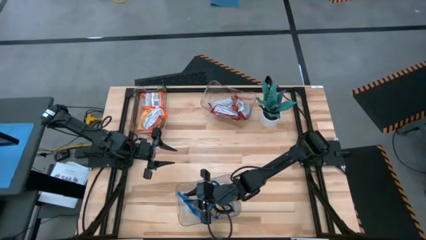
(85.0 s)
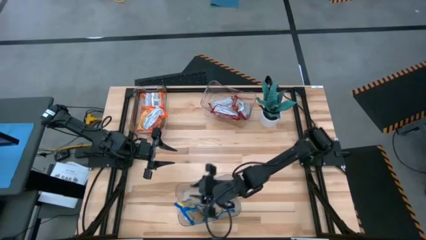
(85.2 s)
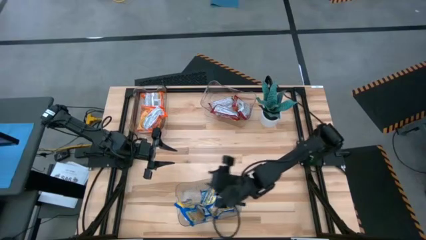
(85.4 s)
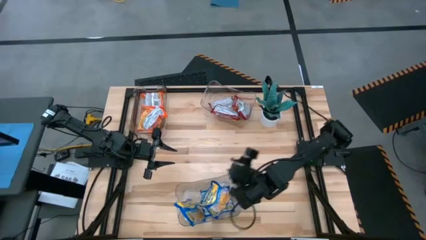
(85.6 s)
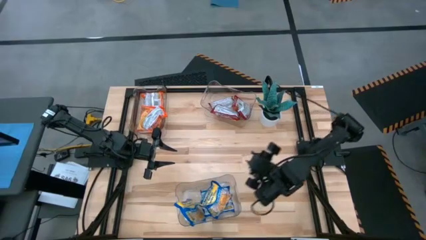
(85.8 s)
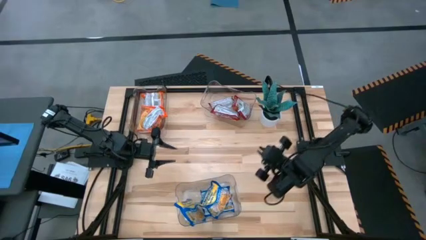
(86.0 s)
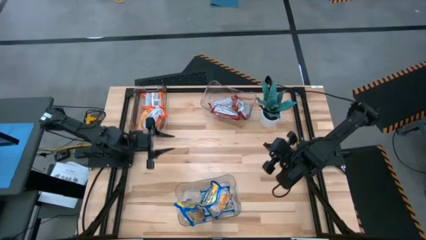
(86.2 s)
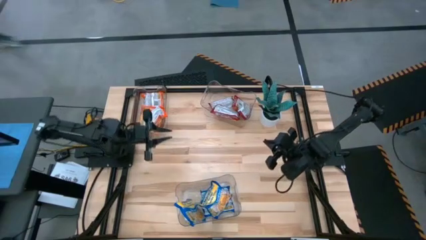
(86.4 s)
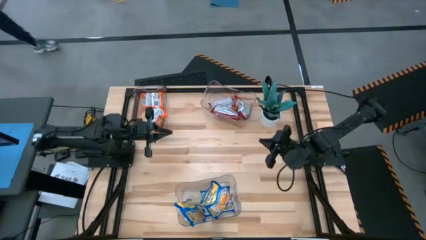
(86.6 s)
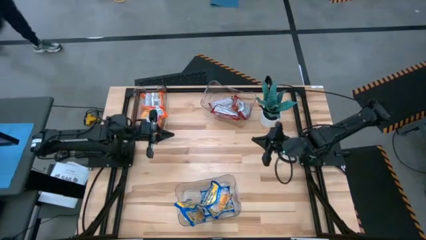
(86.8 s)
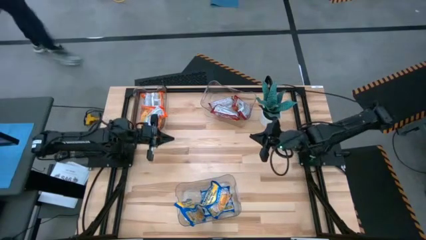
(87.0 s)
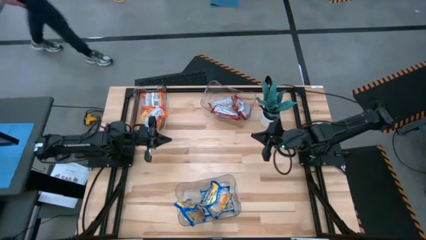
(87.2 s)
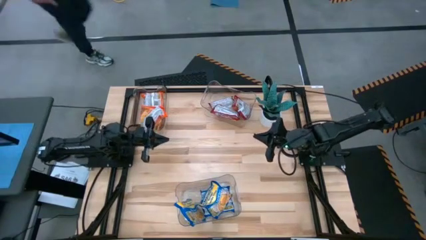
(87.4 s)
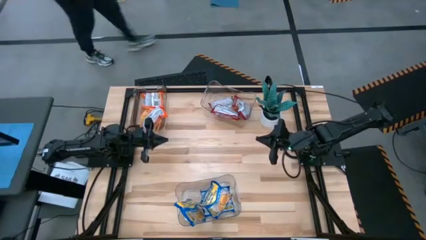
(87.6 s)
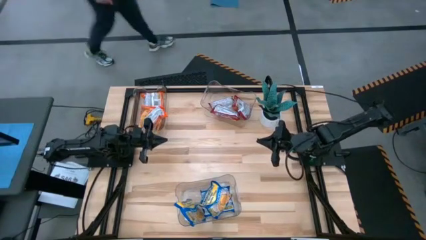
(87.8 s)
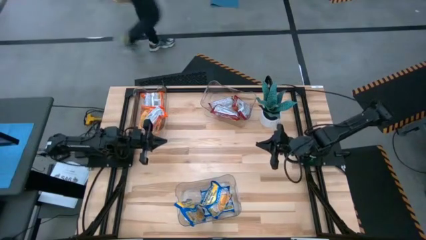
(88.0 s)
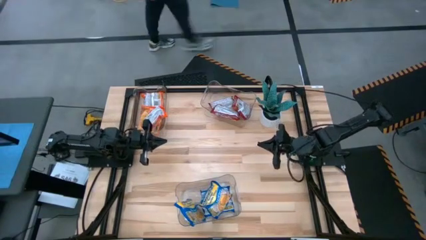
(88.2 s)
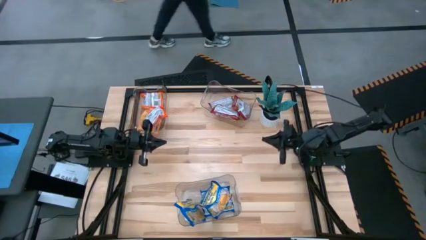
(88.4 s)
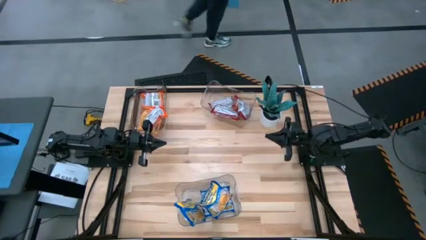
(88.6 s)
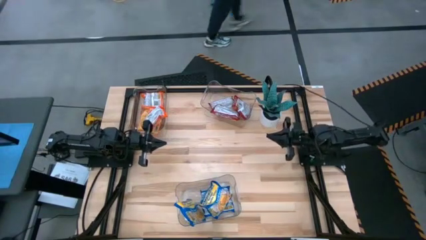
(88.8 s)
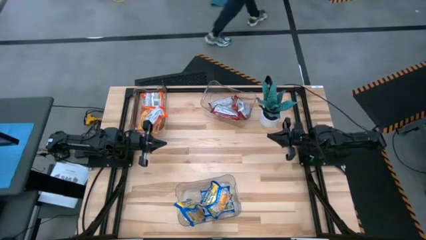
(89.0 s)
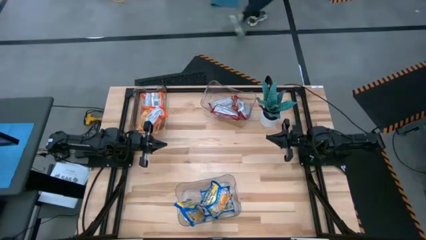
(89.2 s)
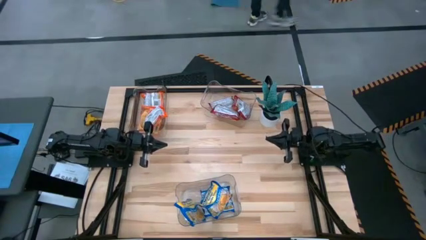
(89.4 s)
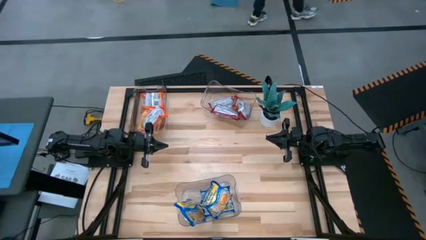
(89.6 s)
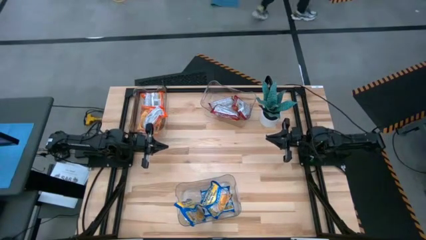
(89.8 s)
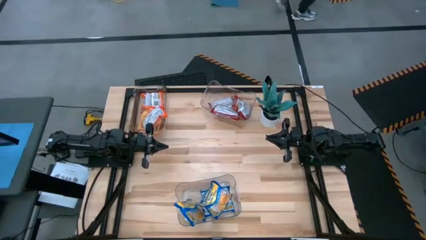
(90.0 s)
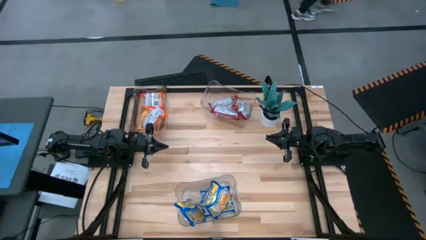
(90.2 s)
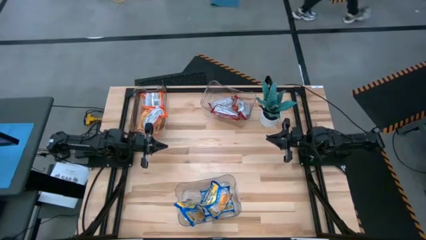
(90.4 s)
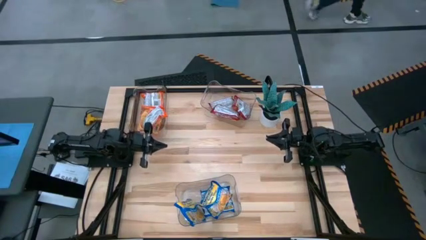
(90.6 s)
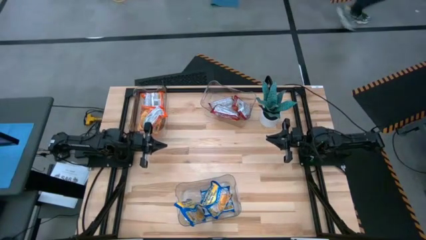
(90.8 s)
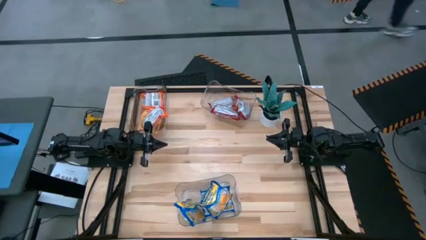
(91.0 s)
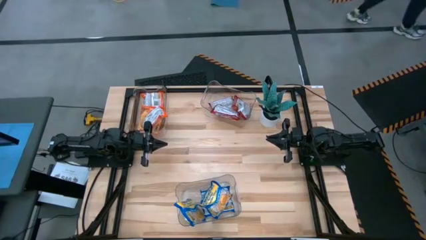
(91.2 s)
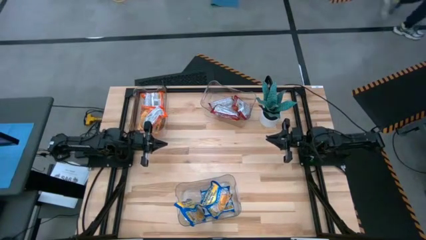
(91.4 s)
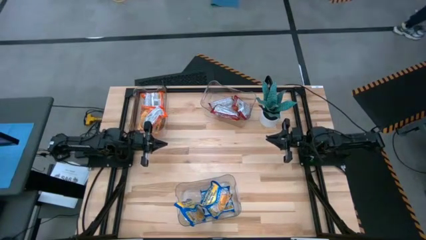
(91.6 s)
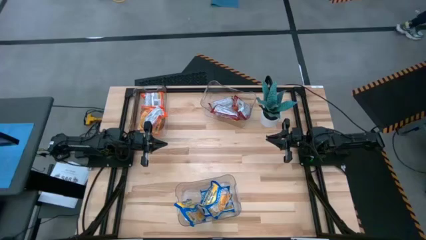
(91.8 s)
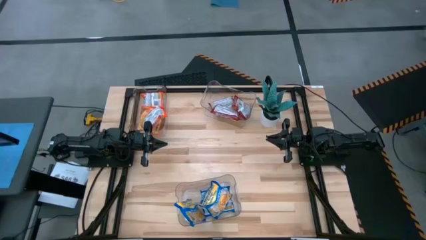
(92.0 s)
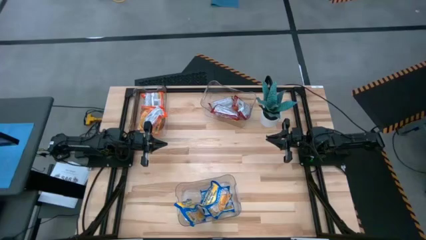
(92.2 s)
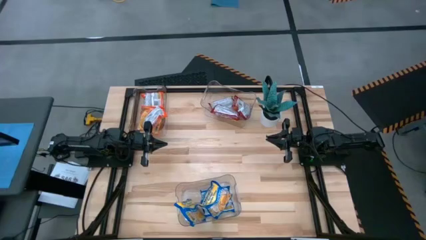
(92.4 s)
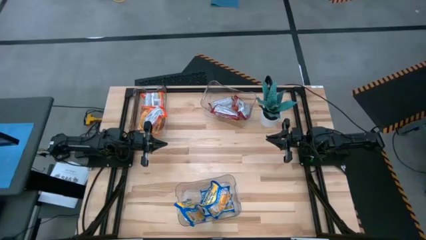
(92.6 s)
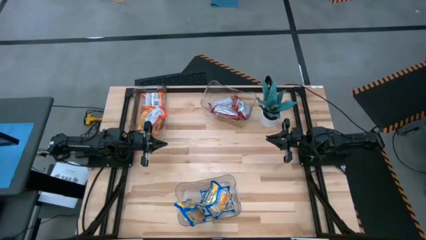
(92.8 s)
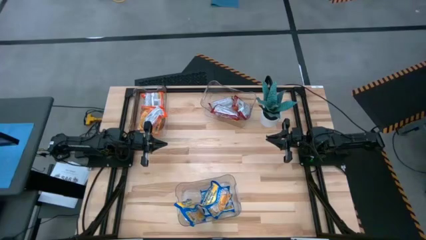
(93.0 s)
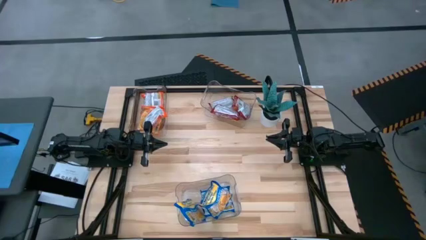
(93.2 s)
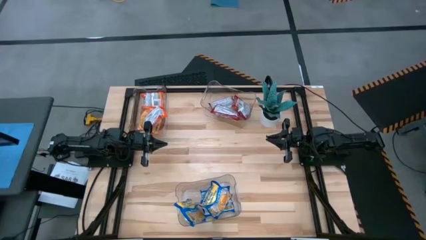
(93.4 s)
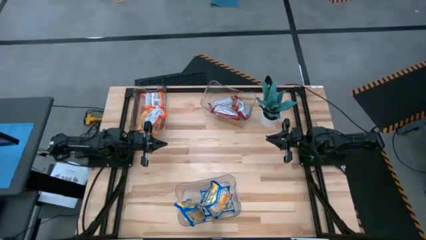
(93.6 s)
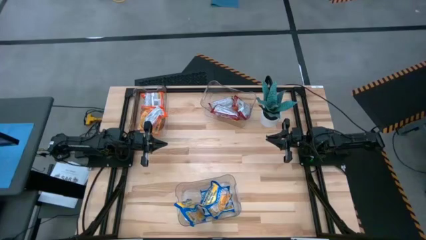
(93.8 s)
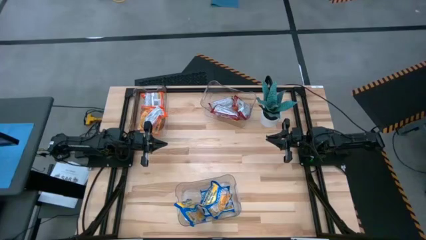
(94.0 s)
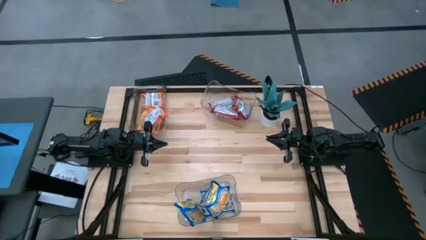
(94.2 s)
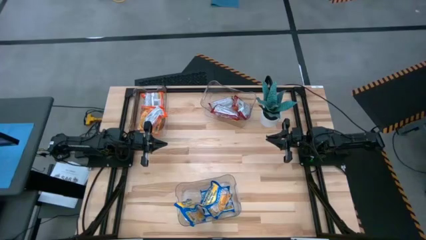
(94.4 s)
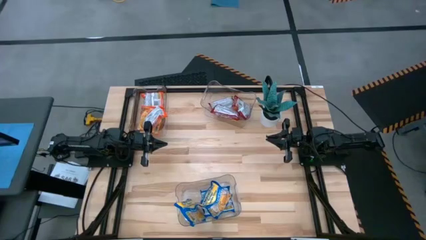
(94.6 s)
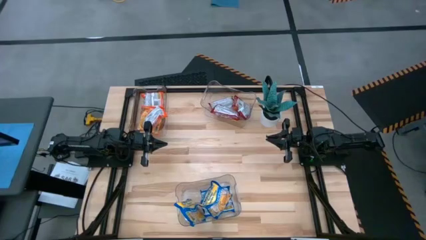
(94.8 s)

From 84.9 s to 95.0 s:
Task: Sort Maruchan noodles
Return to Home Position

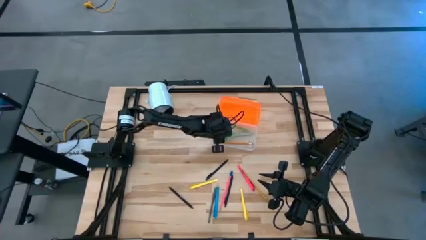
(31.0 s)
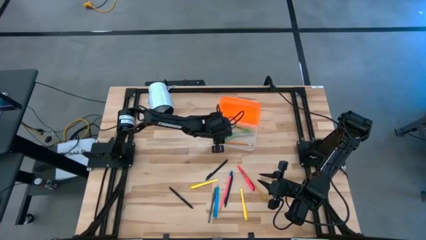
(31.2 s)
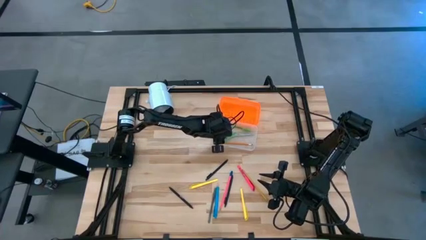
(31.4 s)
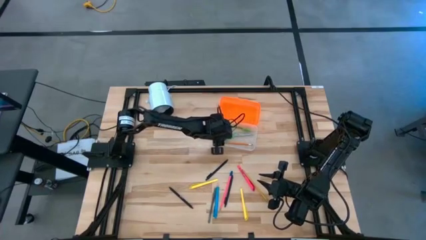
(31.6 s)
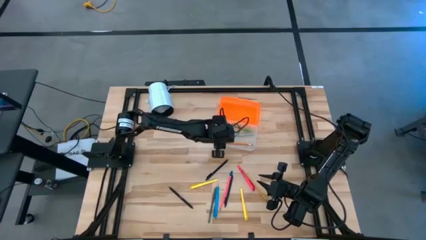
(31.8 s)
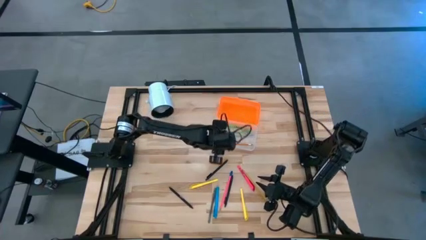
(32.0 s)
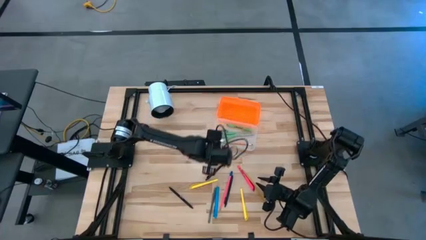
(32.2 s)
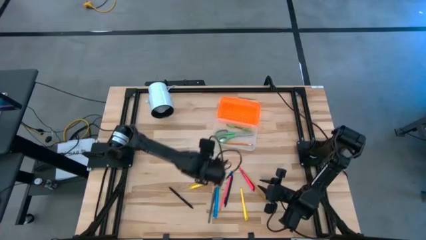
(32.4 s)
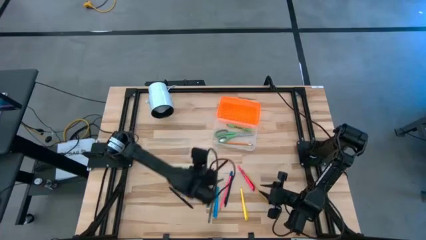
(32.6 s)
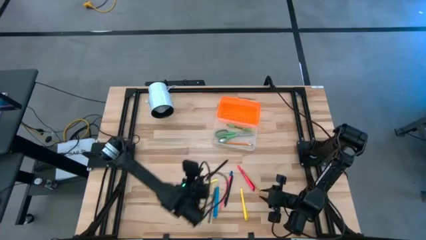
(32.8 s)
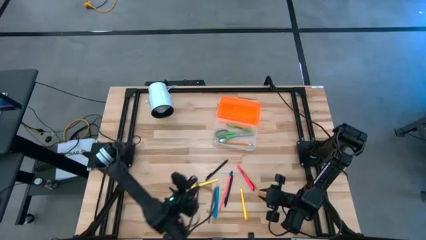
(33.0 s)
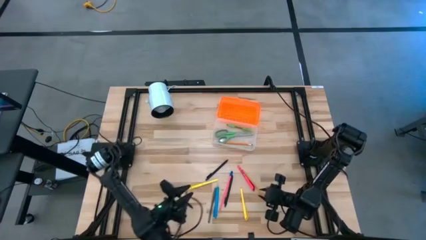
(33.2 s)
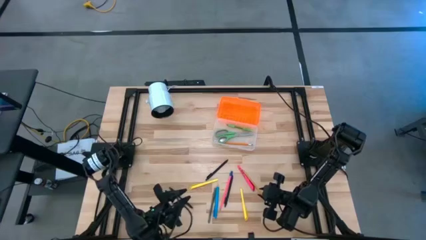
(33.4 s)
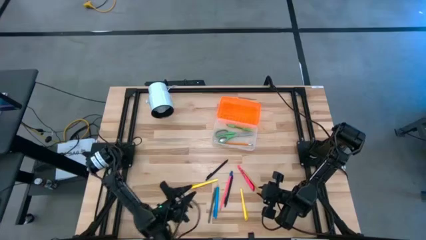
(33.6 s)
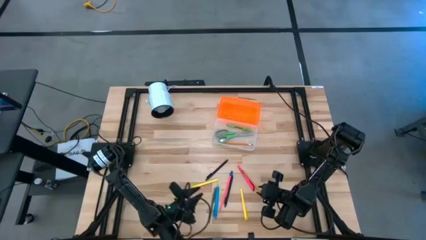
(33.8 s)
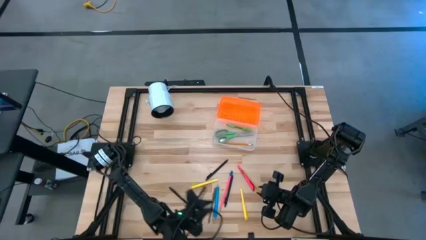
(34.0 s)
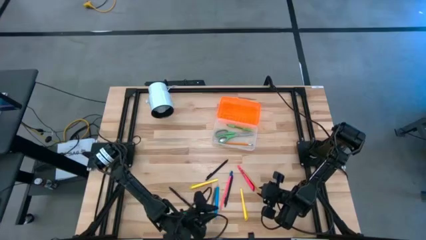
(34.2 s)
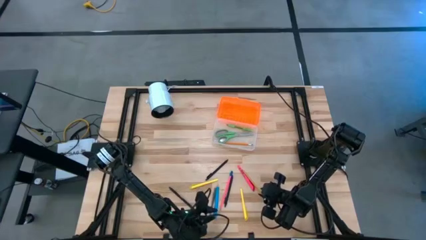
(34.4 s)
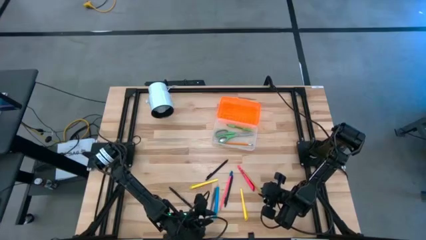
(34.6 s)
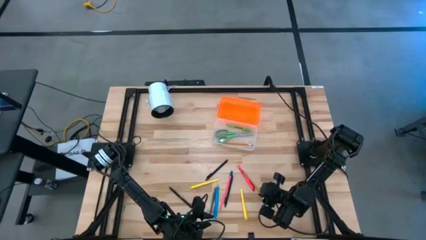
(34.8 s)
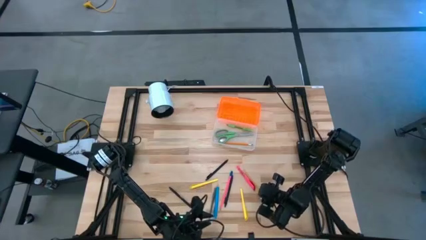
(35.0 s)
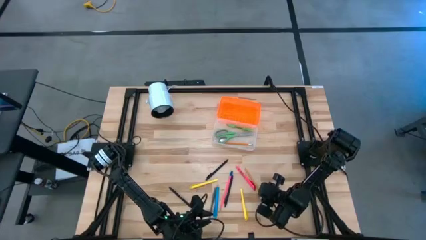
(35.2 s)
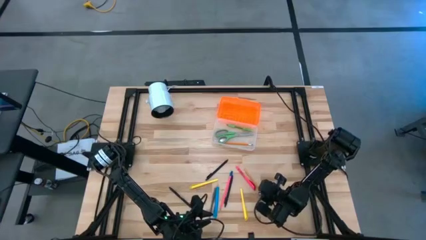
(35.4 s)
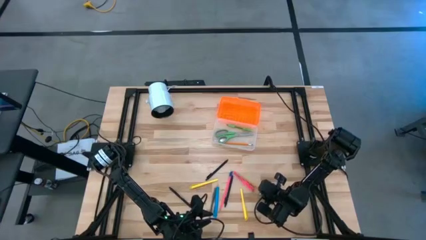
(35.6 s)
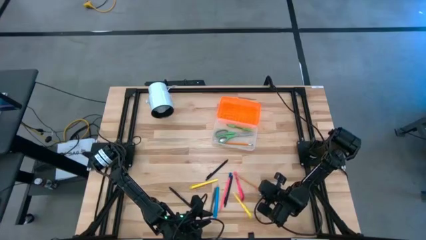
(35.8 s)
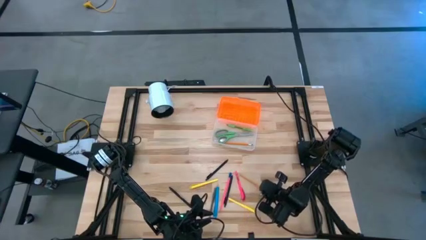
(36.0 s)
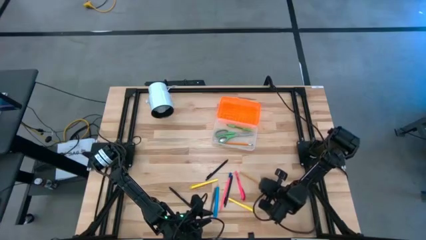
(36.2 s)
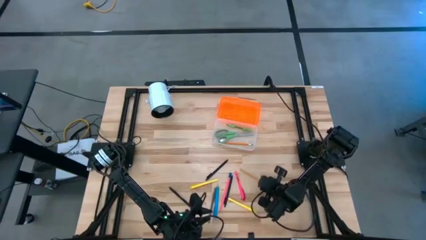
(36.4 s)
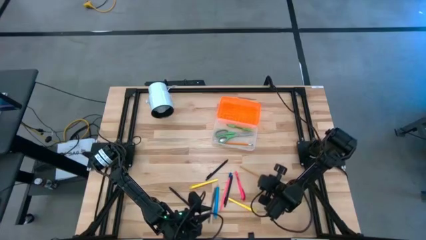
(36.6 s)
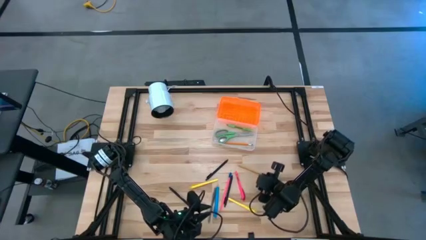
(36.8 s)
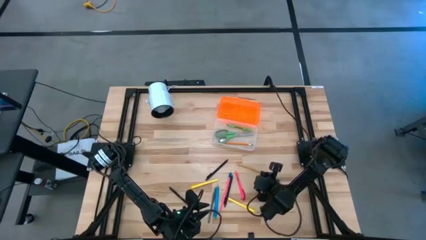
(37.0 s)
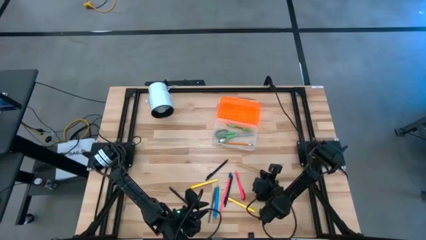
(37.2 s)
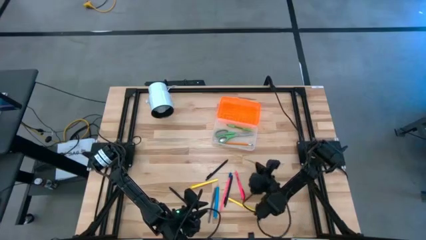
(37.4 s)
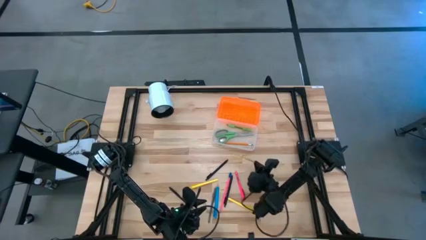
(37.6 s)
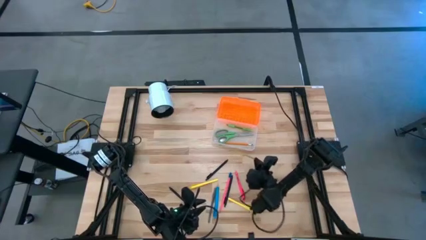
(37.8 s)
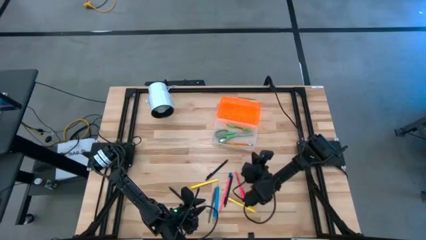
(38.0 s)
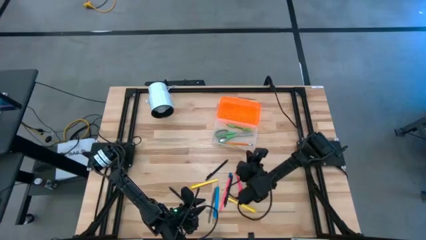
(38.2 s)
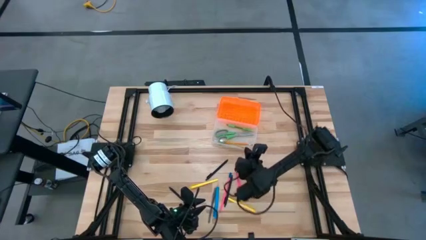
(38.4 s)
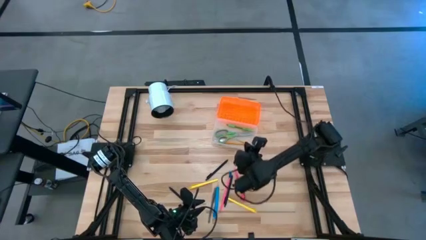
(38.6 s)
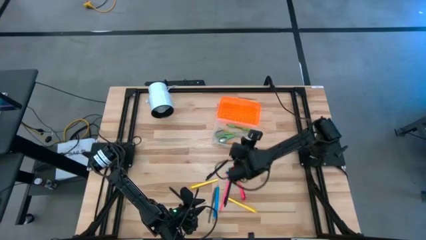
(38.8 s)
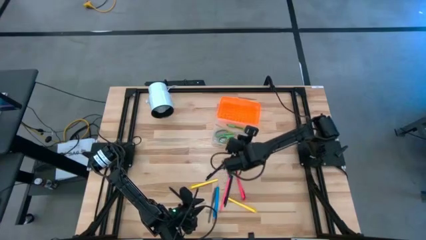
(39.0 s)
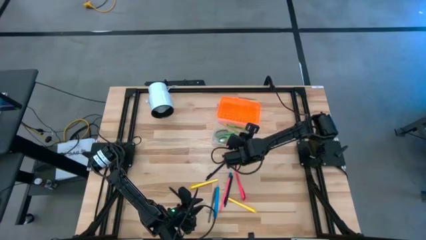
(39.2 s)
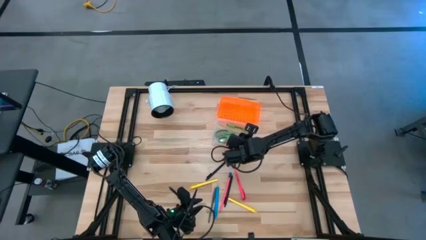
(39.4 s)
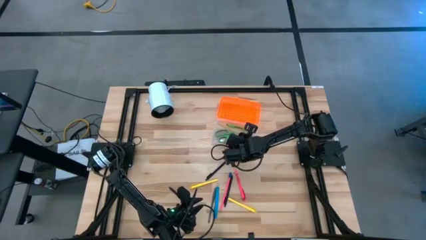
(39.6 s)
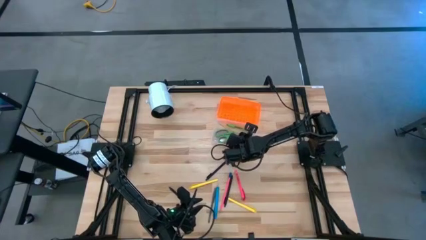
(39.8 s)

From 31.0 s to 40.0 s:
Task: Pick & place school supplies into a supply box
Put the yellow pencil into the supply box
